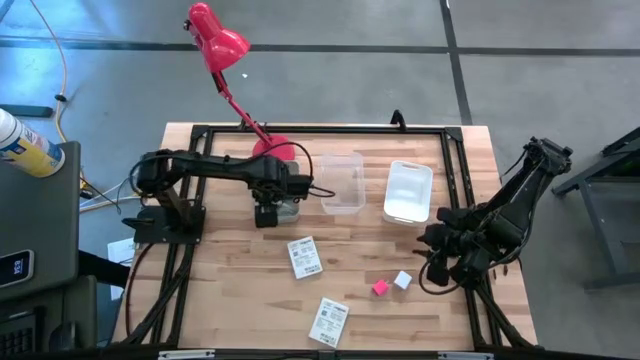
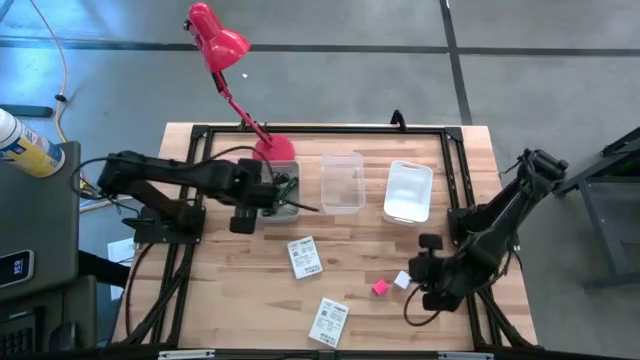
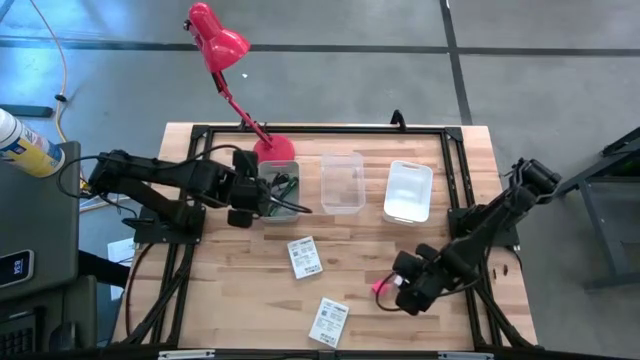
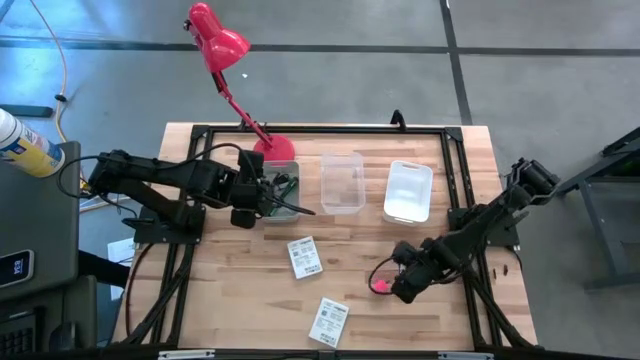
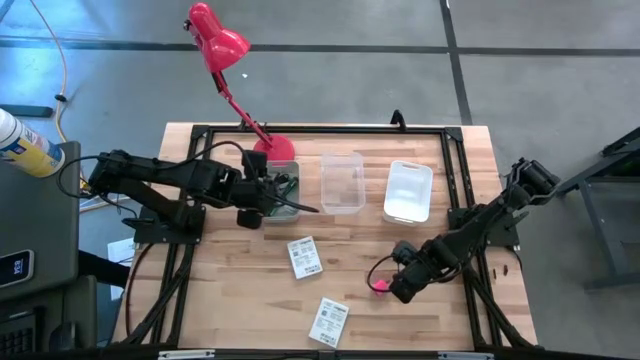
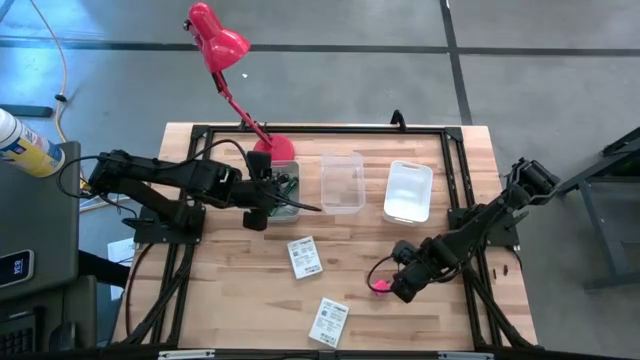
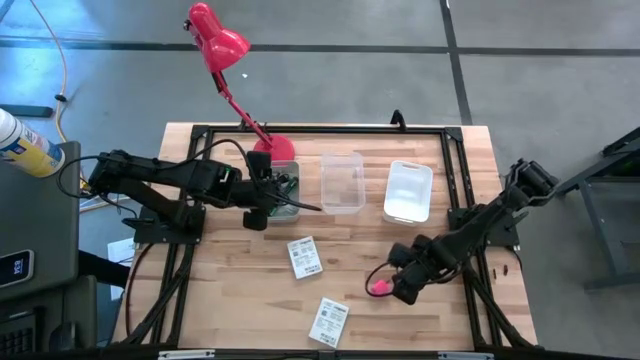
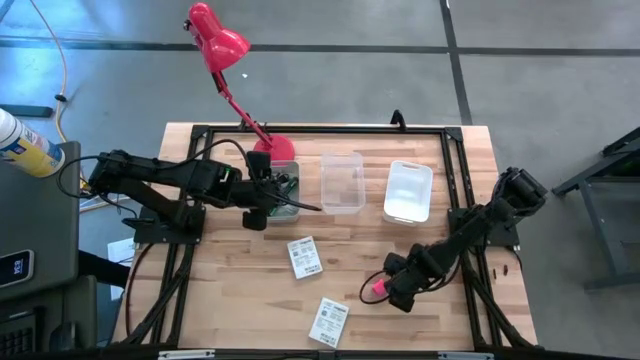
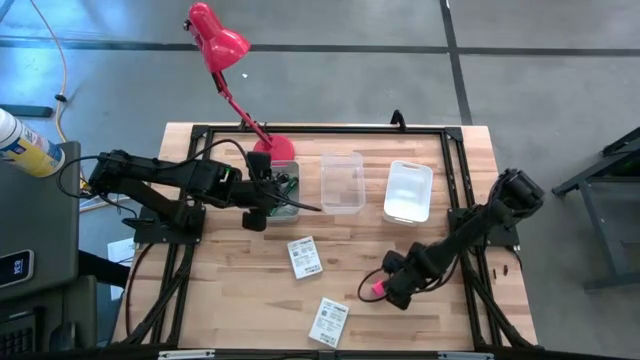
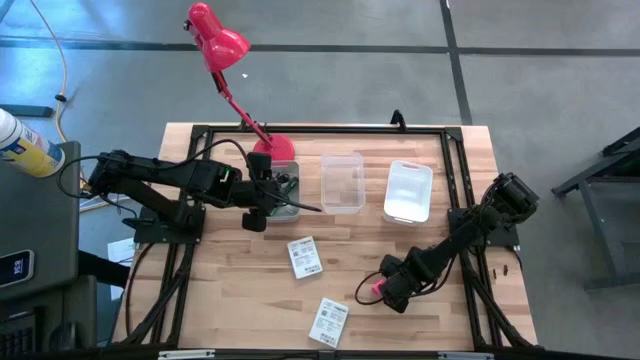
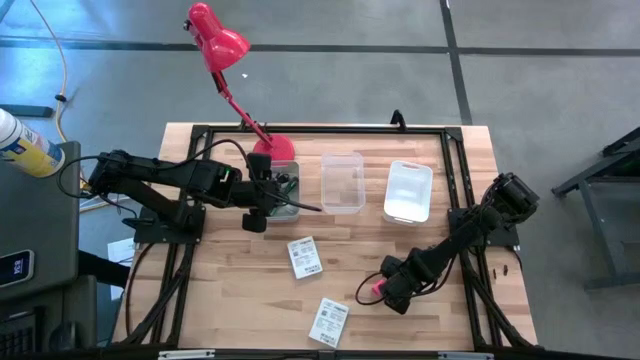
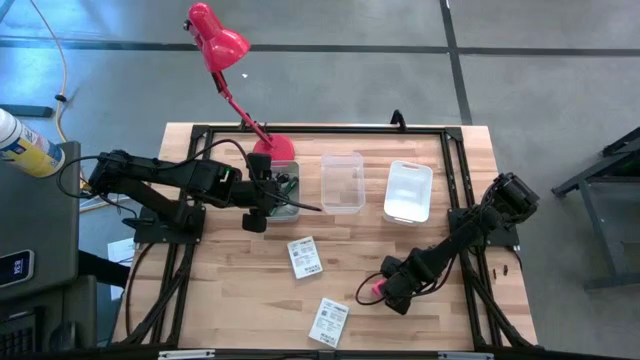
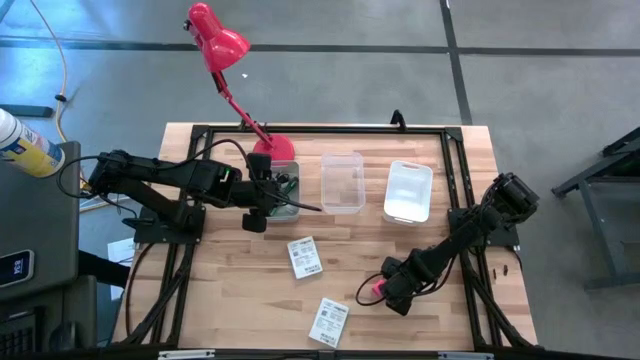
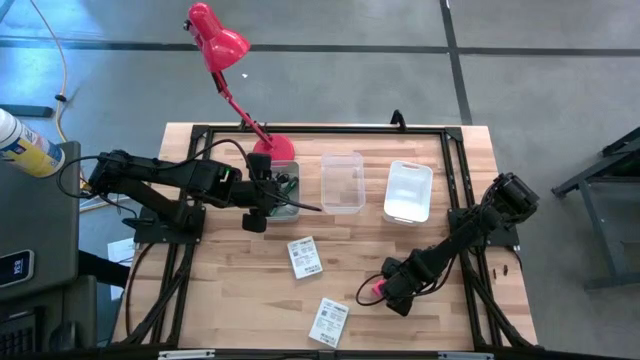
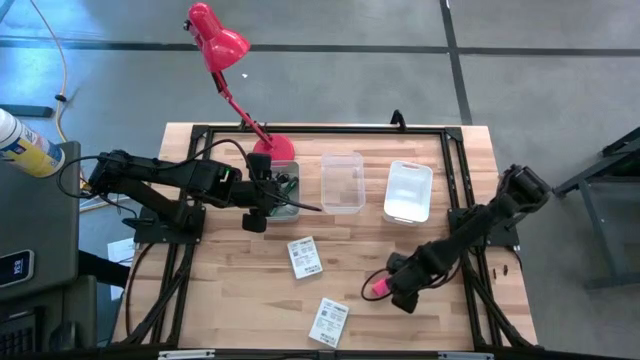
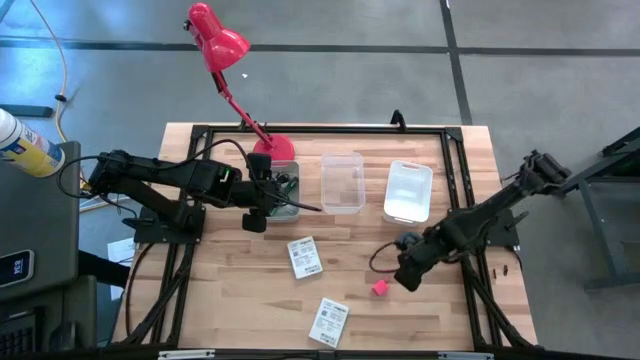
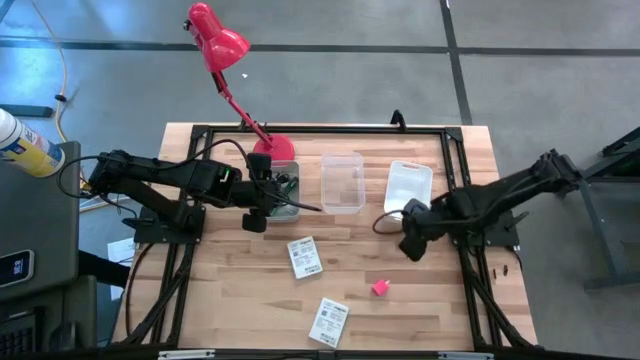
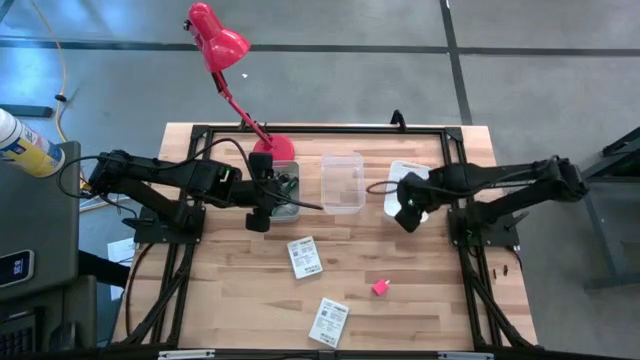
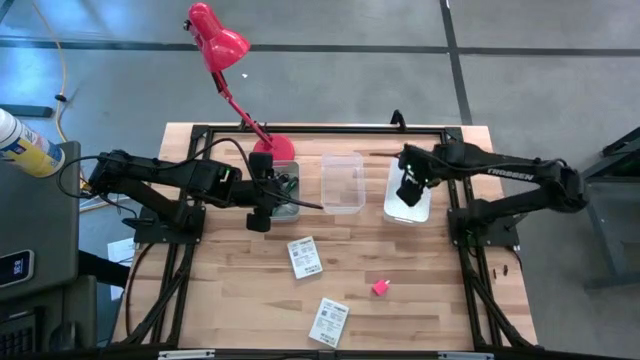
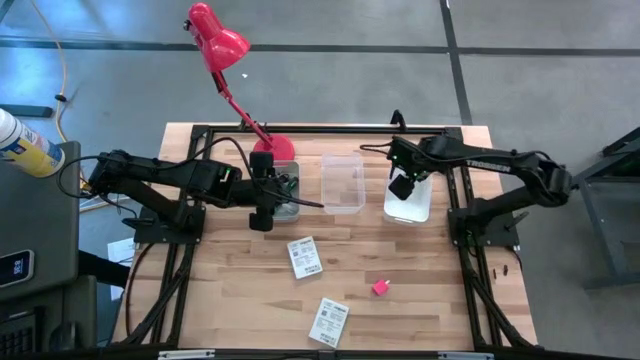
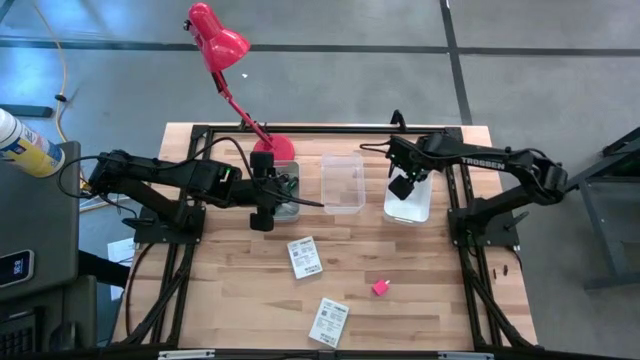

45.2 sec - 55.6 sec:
Task: Pick and place items into bin
Put the white charger adapter into the white bin

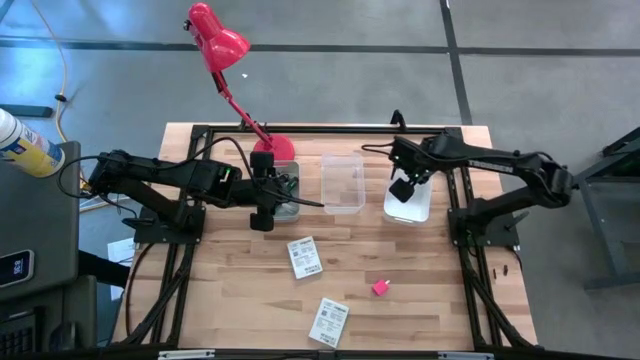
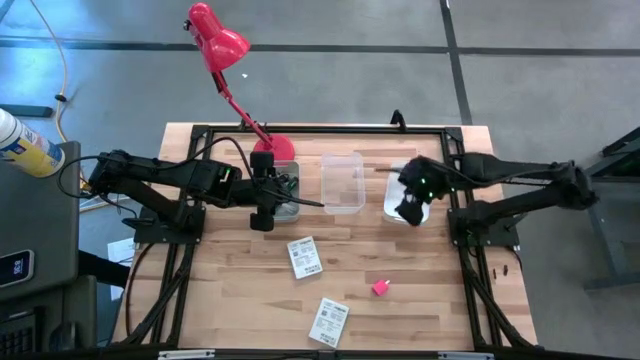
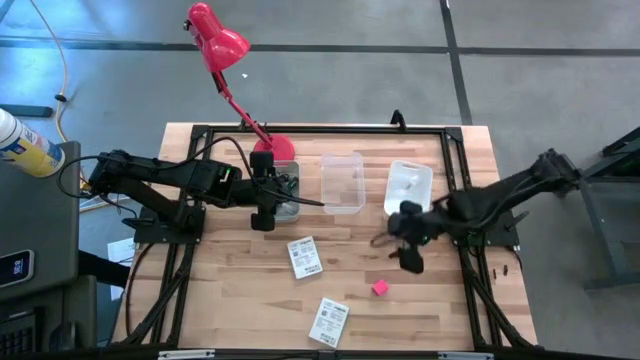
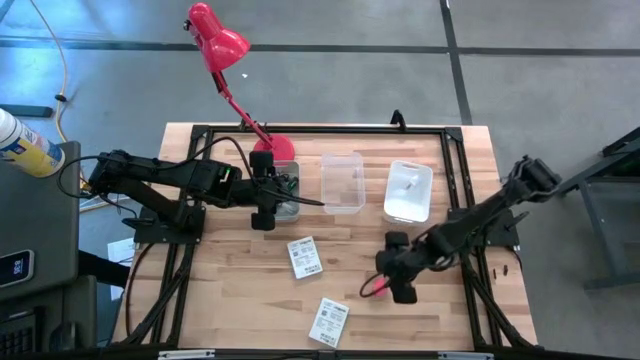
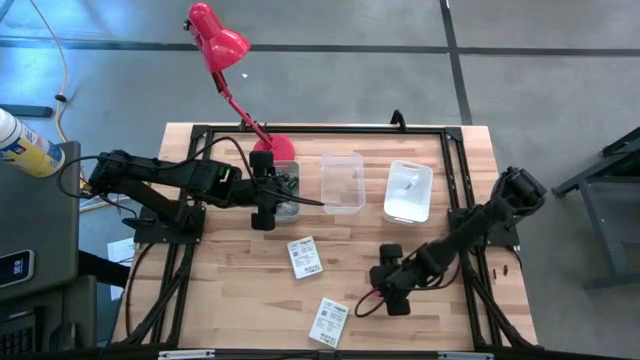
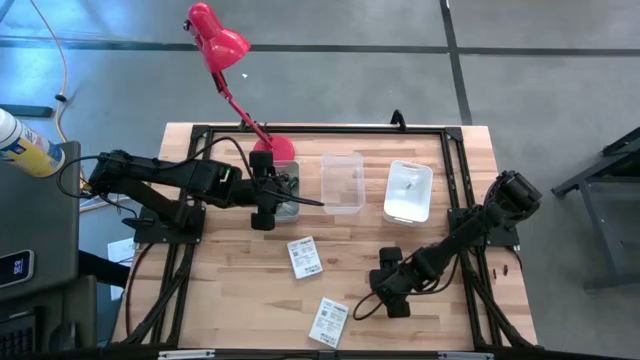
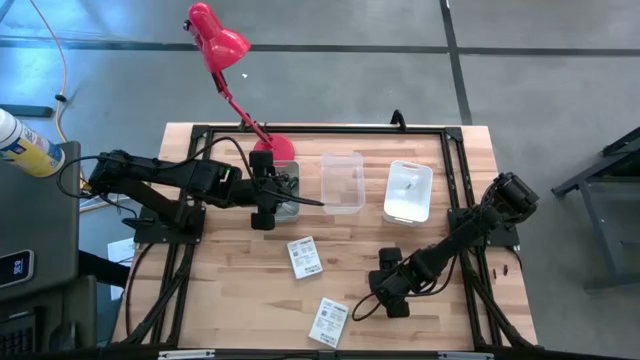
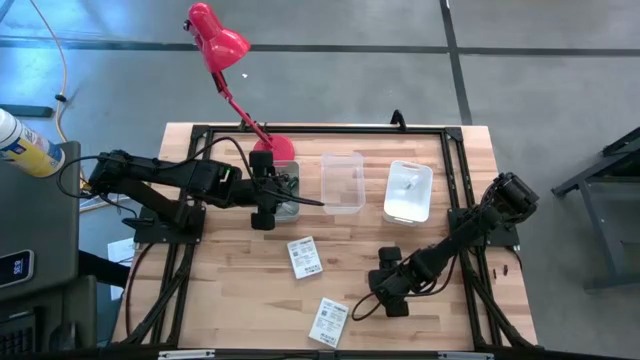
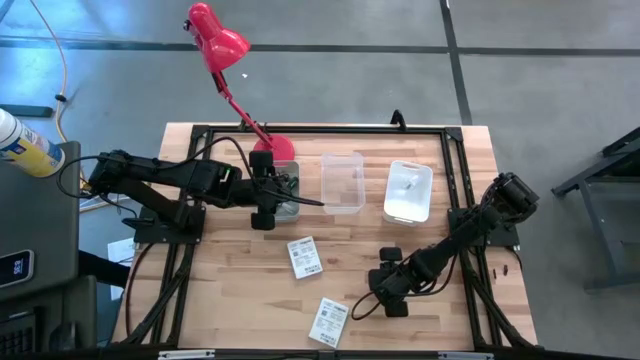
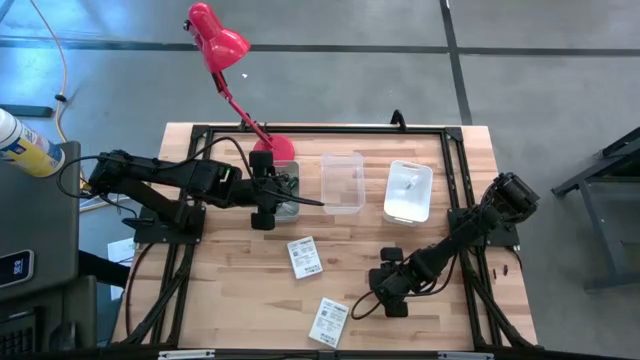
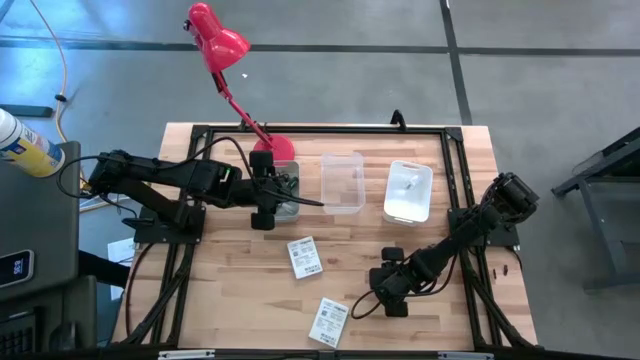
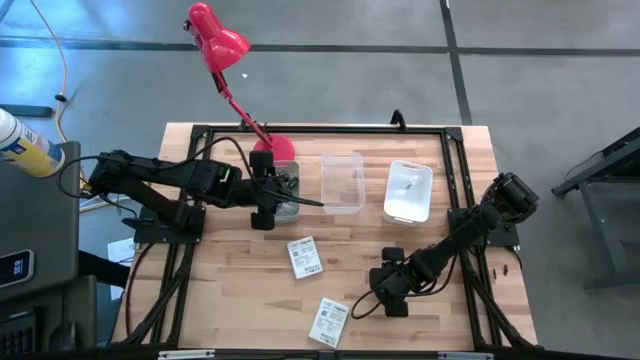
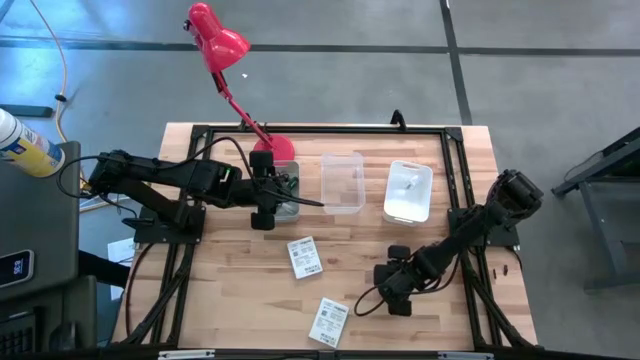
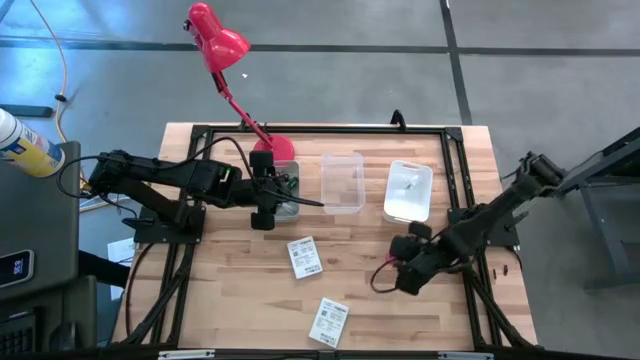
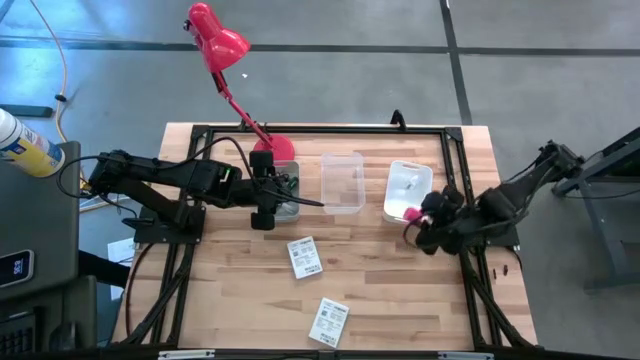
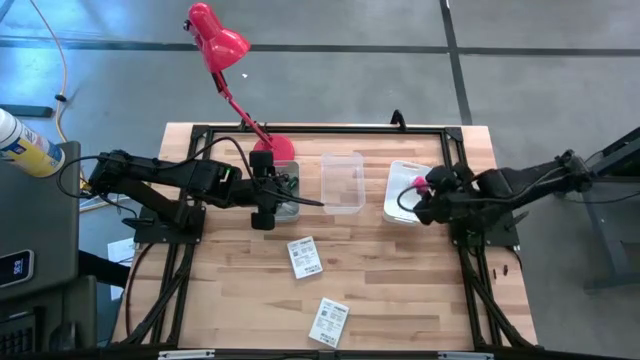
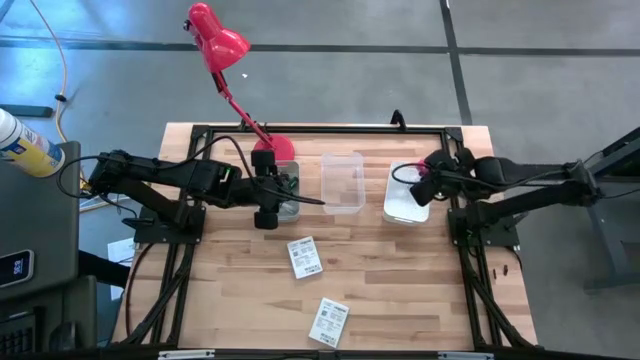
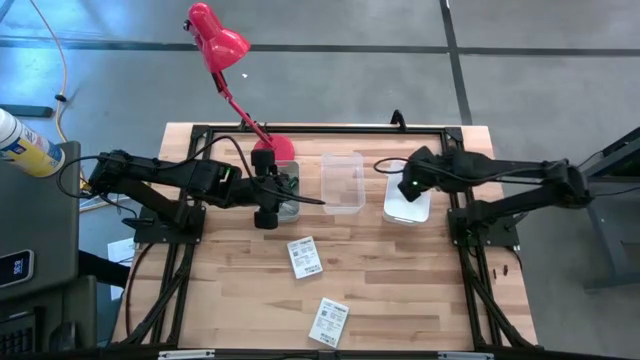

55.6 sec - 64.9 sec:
Put the pink charger adapter into the white bin

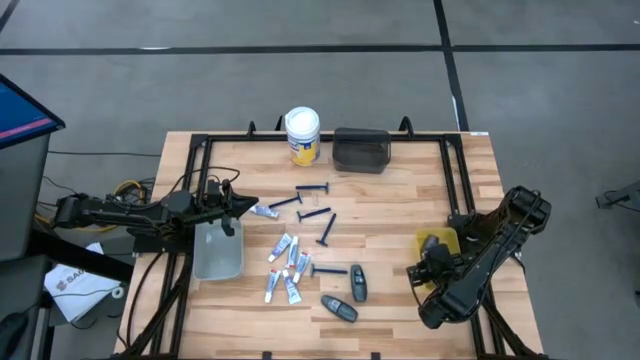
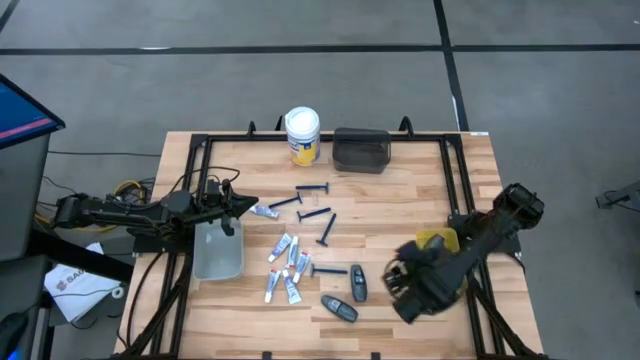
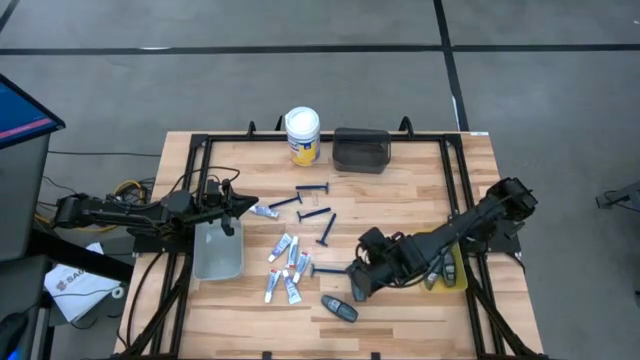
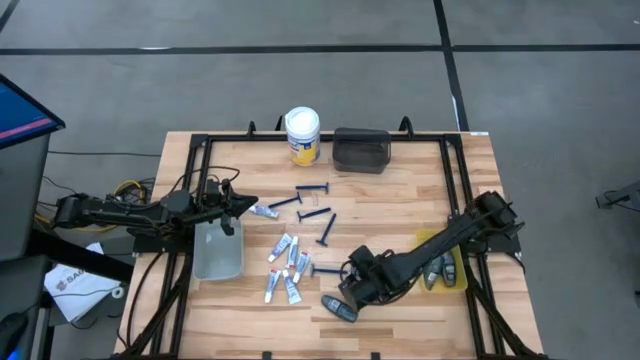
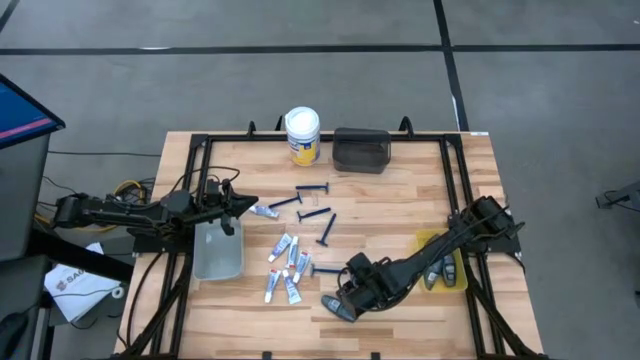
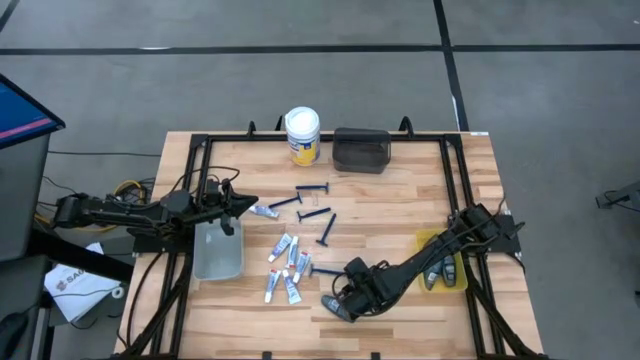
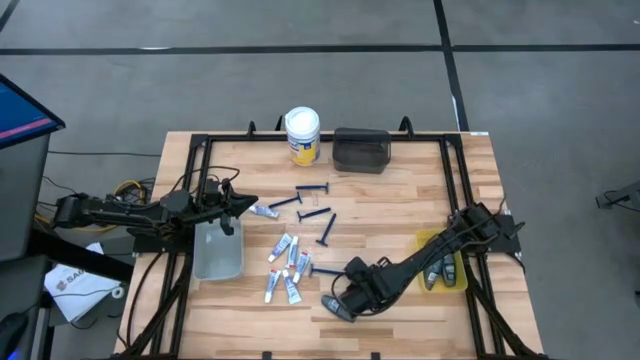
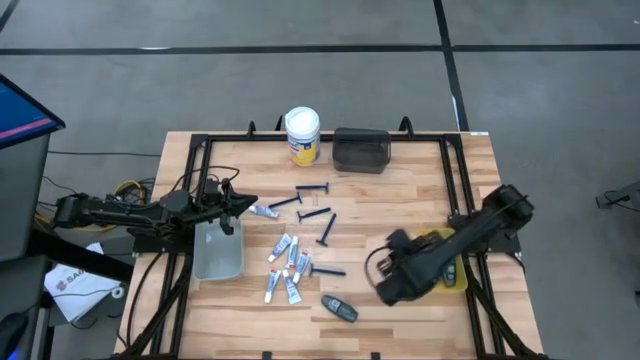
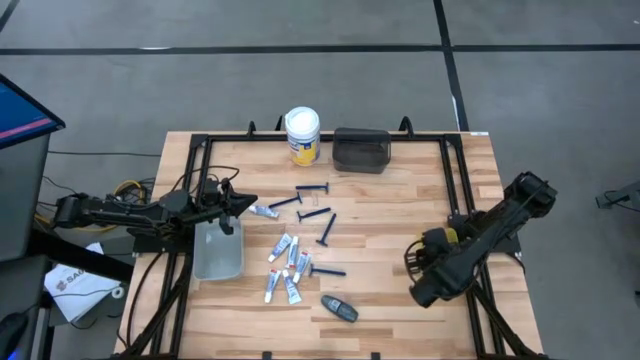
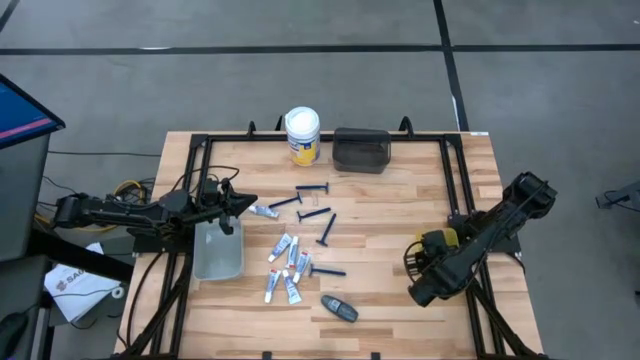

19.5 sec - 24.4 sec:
Task: Pick & Place Travel size toiletries
Put the black deodorant into the yellow bin
